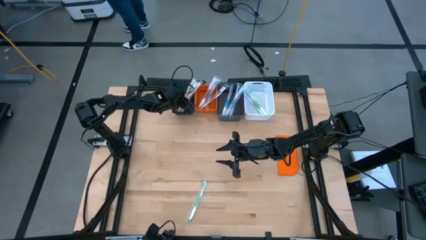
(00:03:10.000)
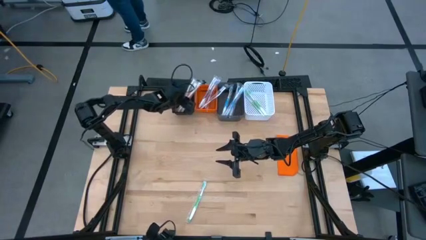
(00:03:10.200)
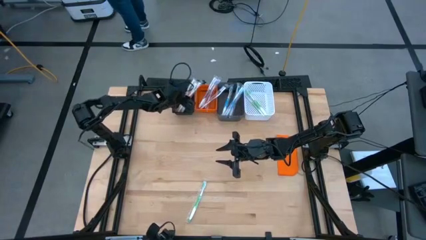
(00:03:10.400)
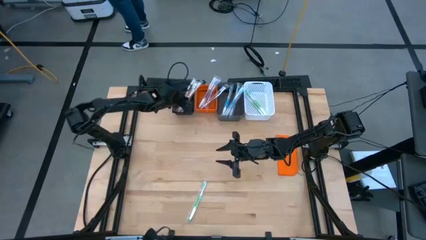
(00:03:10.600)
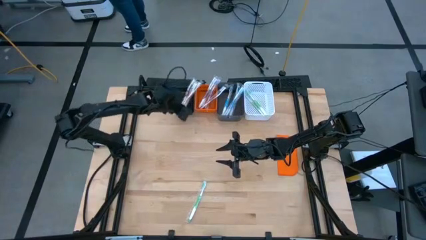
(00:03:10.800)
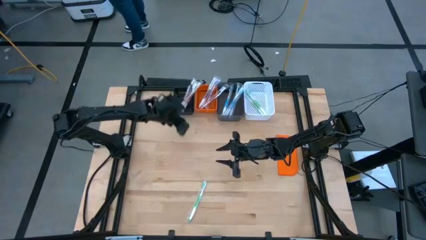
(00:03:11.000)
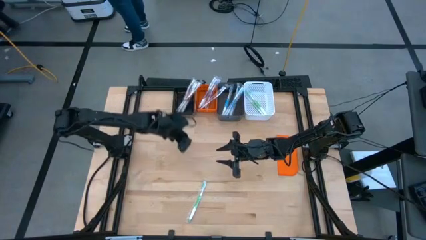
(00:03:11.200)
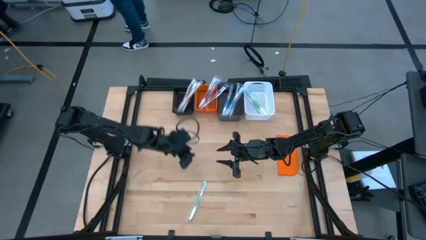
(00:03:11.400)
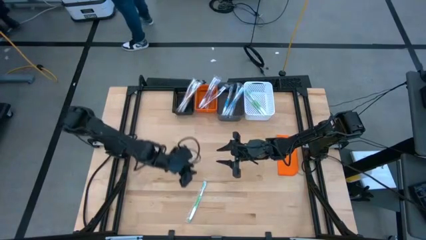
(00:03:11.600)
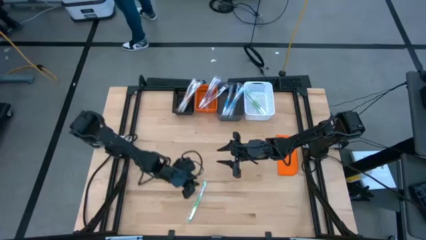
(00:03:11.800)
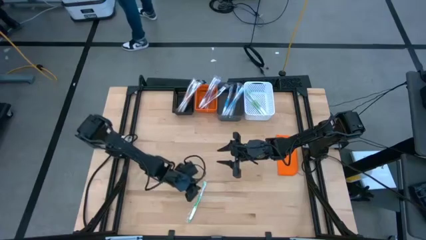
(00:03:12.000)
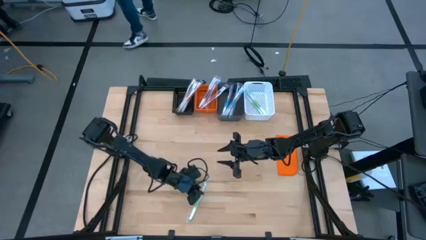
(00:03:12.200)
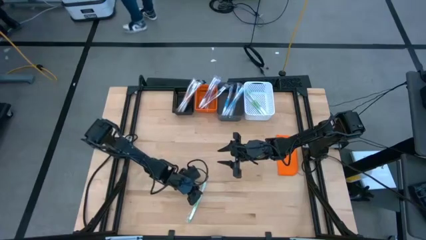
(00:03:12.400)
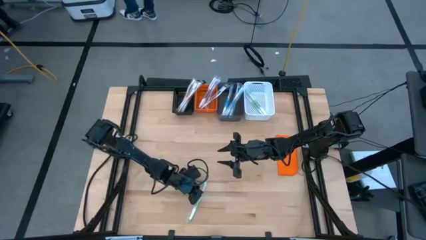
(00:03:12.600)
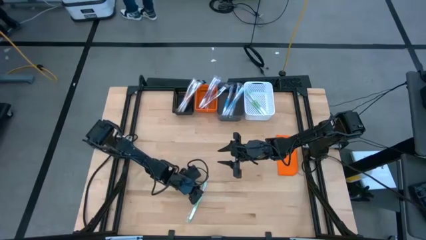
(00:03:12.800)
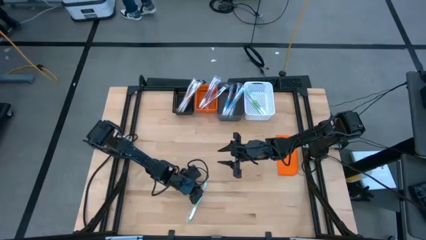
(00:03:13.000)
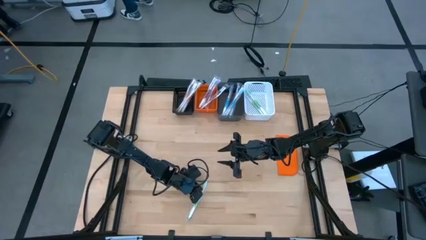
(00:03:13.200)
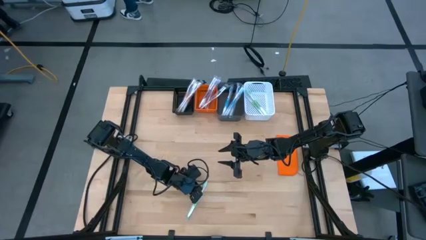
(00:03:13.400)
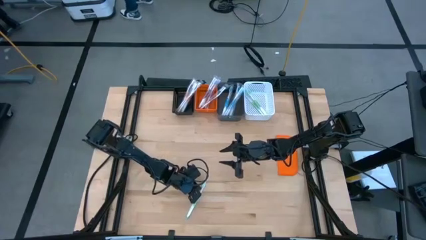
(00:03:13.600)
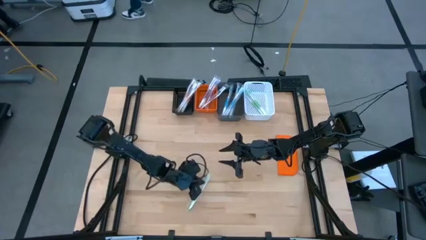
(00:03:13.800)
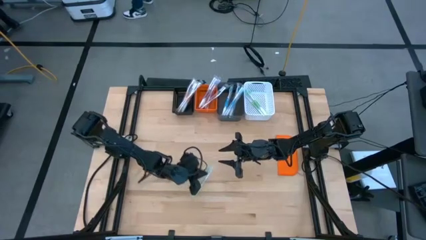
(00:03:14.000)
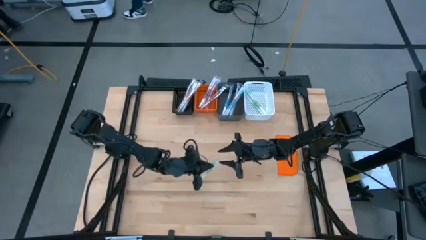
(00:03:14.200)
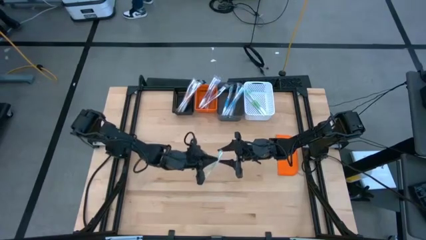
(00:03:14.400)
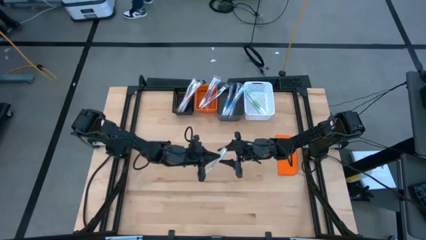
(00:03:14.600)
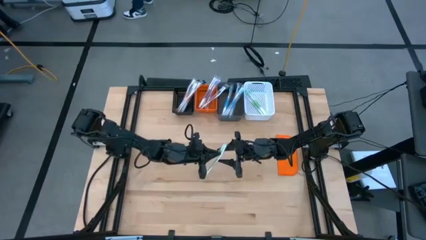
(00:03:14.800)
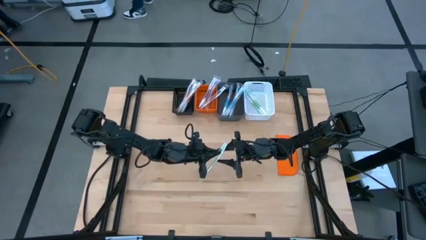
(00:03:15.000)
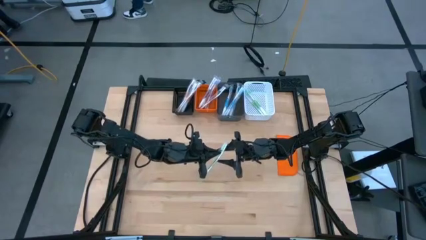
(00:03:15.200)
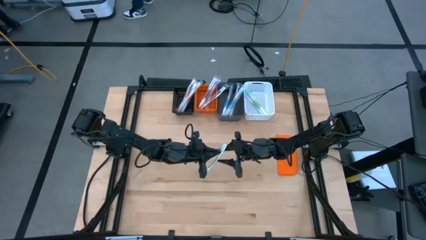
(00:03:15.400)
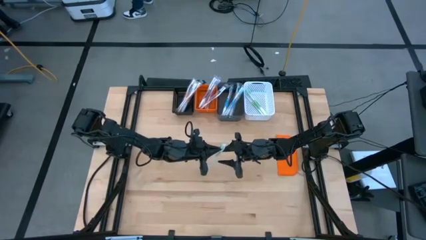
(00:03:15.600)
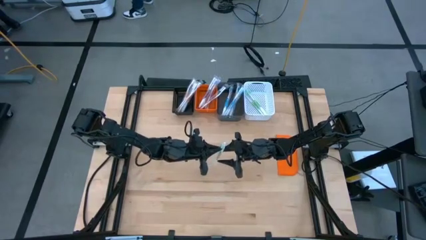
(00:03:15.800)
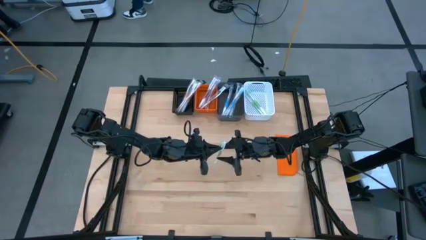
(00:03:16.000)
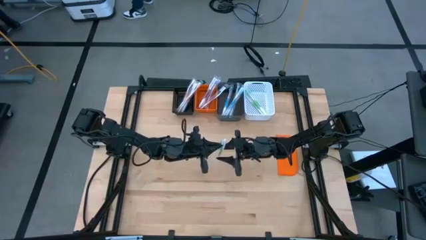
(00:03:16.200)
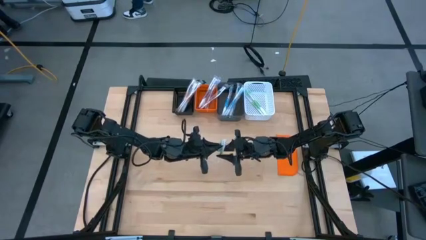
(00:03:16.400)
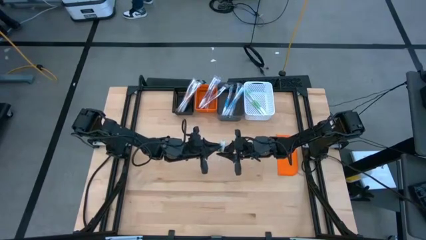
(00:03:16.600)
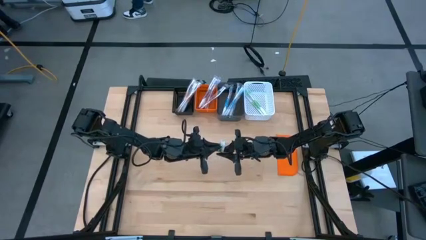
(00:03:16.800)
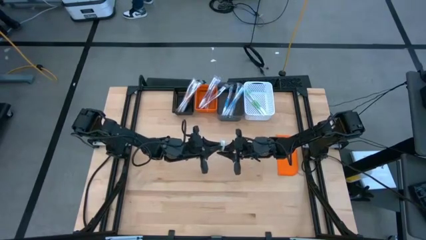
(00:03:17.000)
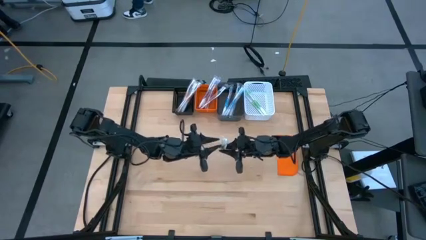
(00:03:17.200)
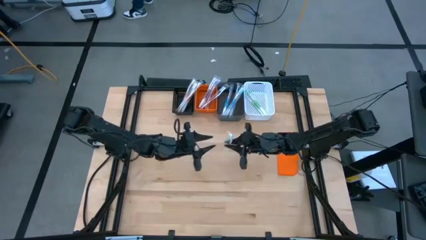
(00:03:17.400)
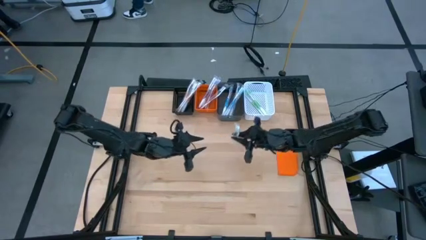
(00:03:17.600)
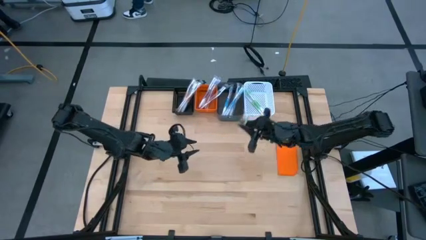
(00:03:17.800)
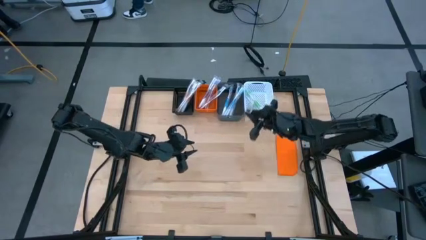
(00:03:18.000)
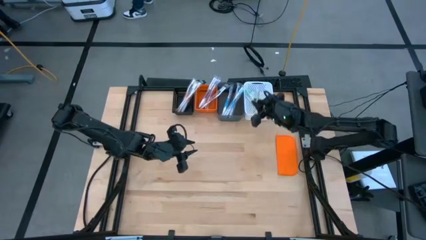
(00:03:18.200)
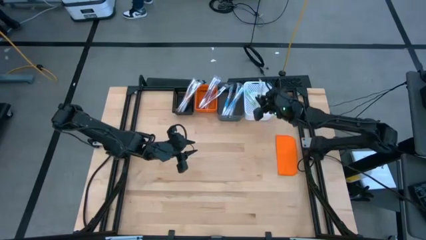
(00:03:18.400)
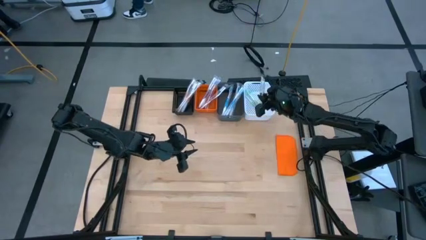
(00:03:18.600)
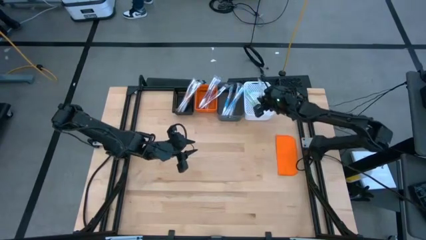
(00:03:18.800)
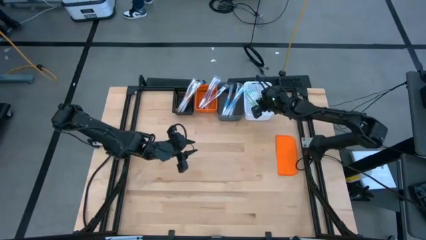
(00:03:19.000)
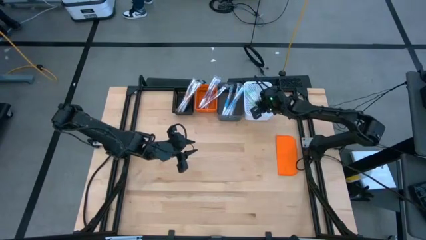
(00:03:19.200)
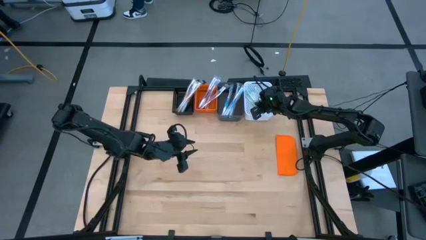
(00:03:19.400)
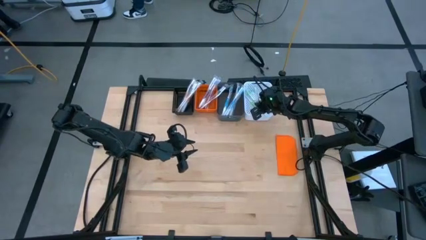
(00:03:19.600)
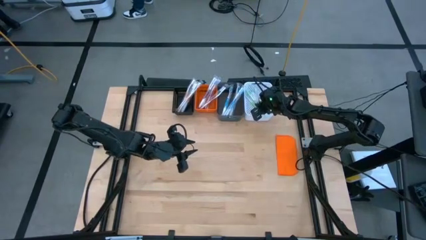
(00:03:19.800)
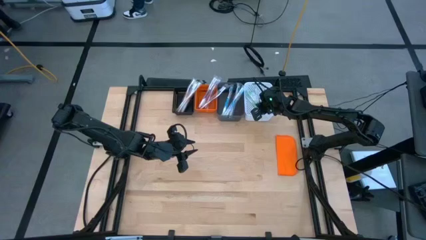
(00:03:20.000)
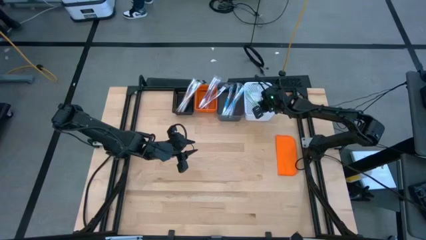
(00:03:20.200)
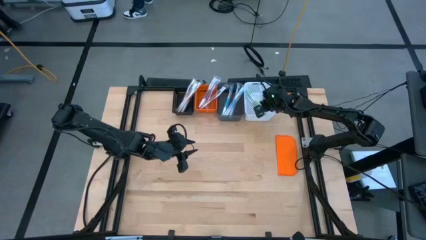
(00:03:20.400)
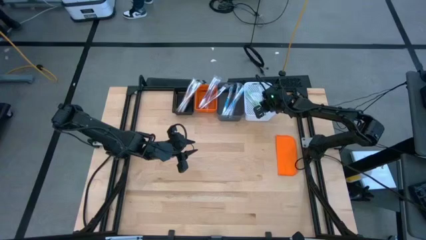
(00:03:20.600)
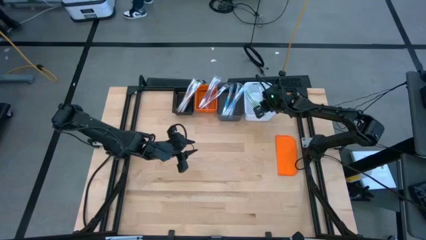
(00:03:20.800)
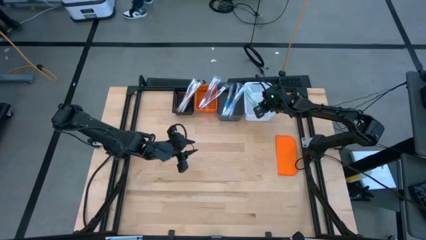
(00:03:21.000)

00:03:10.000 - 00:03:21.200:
Task: Pick & Place Toothbrushes
Put the green toothbrush into the white bin

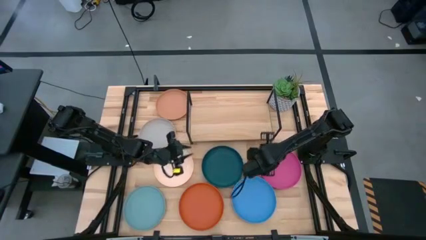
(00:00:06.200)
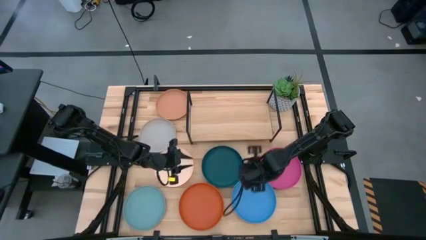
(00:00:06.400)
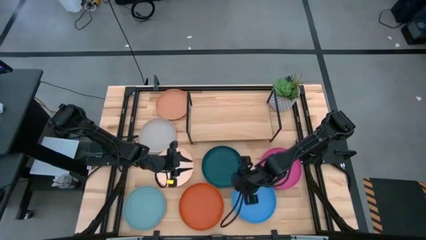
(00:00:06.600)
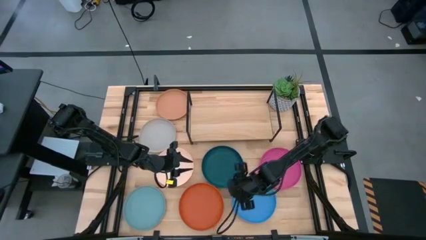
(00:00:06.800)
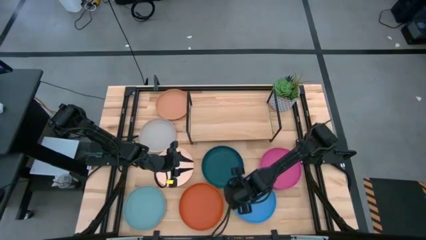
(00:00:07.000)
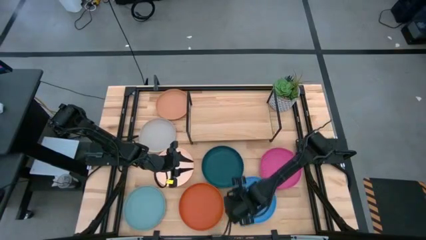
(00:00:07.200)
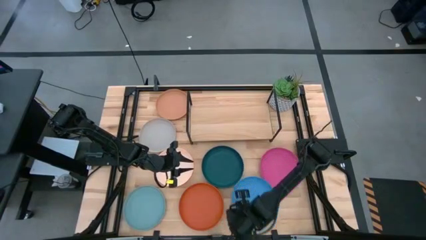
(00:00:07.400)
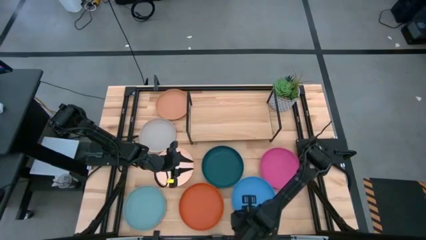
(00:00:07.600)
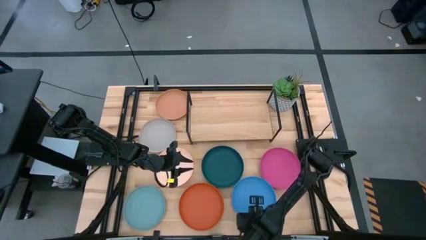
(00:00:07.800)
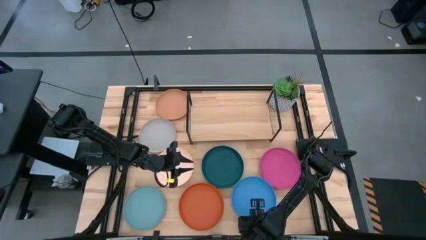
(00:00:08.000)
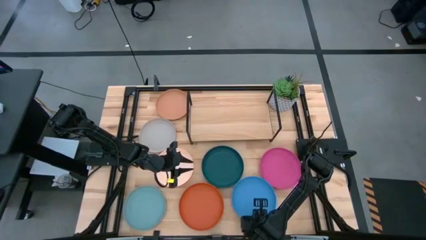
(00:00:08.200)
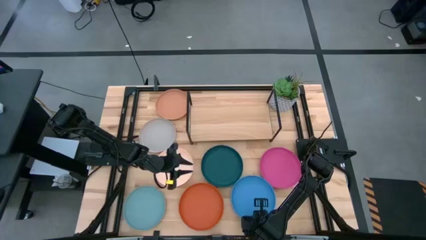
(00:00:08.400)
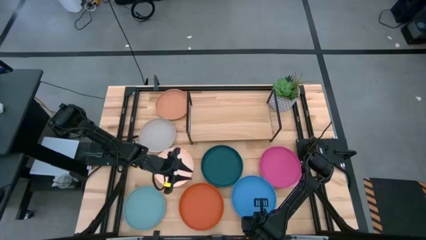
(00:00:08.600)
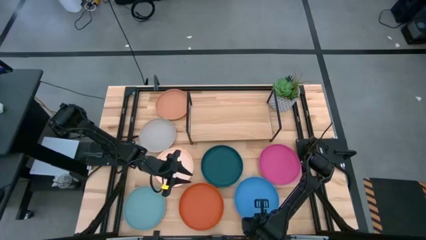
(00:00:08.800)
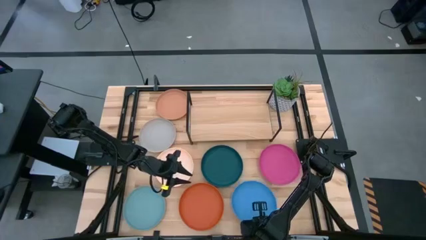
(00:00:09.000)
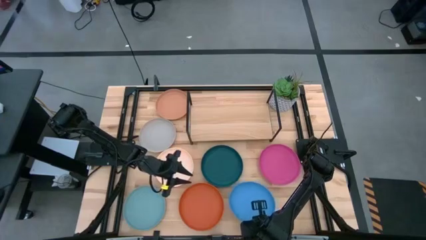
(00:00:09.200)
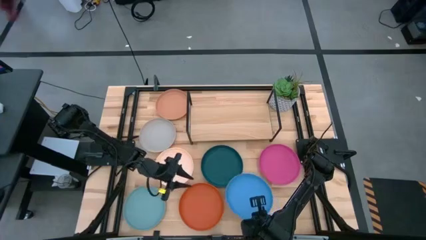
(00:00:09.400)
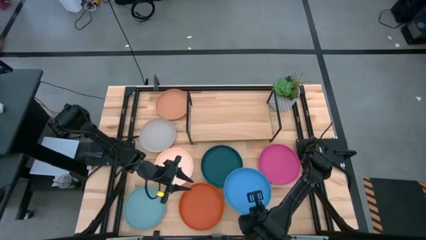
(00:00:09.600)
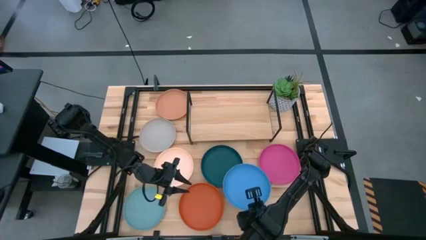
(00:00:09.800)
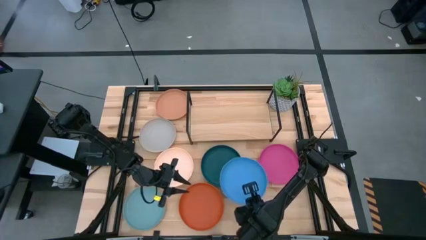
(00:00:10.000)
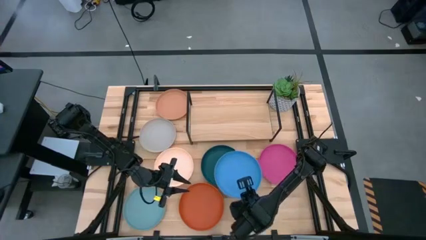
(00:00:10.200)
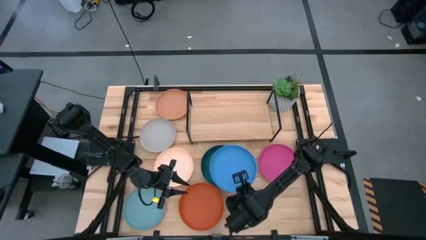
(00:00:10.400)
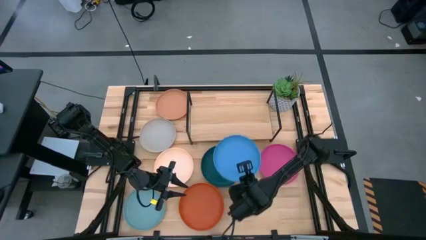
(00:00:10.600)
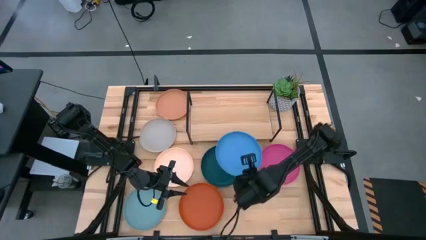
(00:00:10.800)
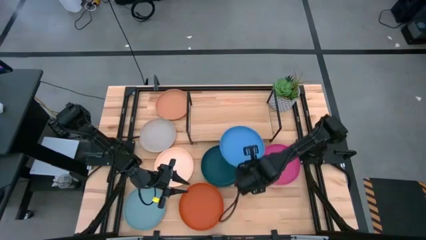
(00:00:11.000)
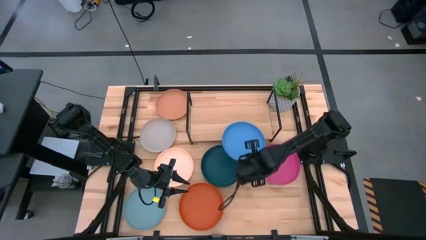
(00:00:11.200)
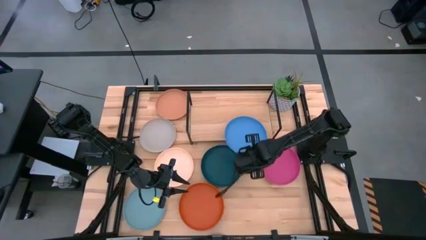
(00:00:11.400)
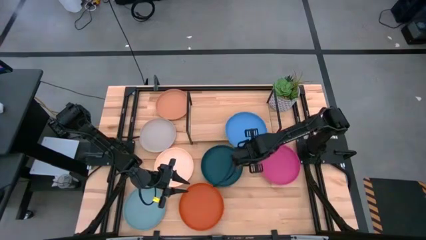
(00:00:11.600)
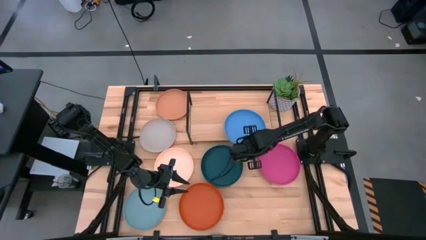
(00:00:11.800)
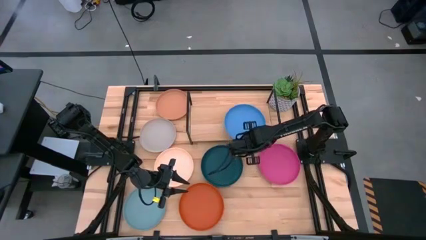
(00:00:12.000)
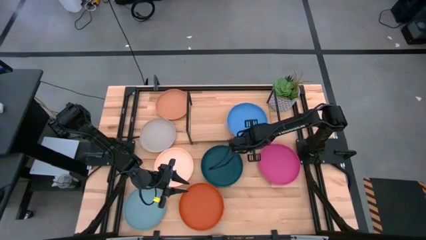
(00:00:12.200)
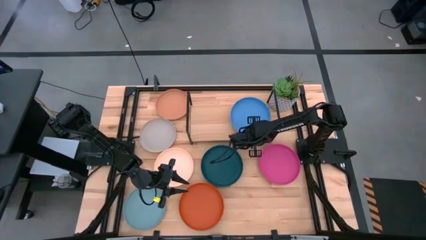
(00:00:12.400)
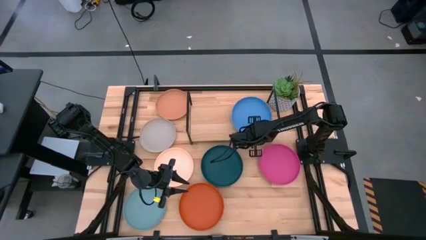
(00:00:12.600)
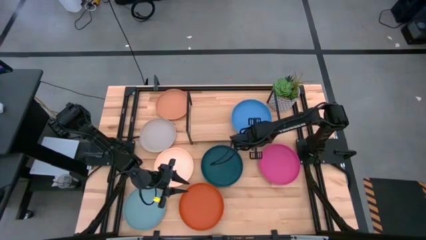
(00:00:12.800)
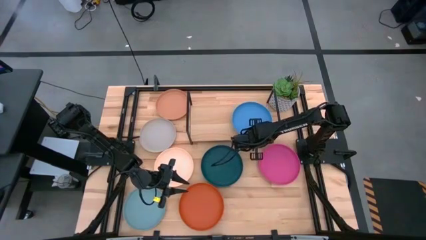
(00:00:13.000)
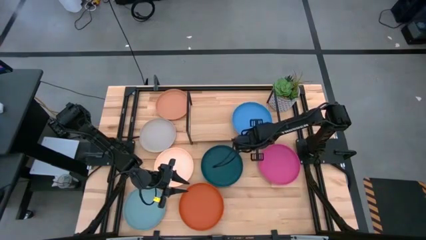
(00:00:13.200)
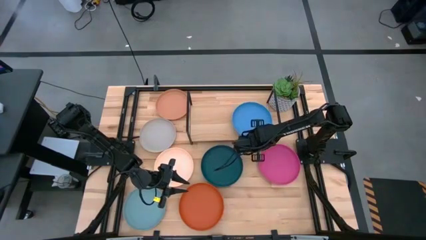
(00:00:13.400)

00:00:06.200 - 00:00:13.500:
Task: Place and stack plates onto a shelf
Put the blue plate on the shelf
